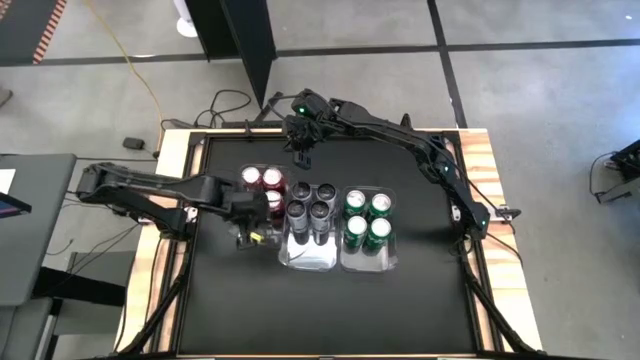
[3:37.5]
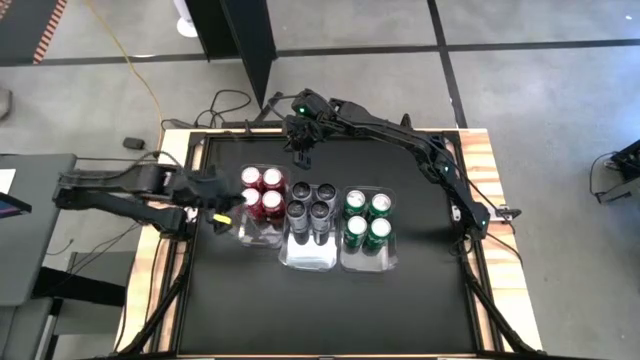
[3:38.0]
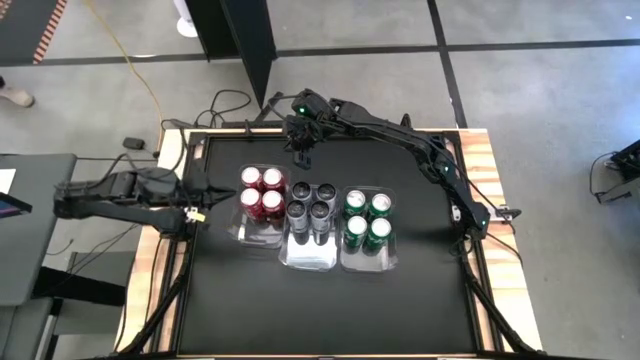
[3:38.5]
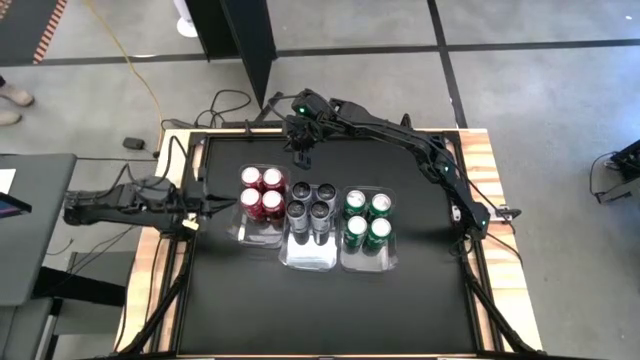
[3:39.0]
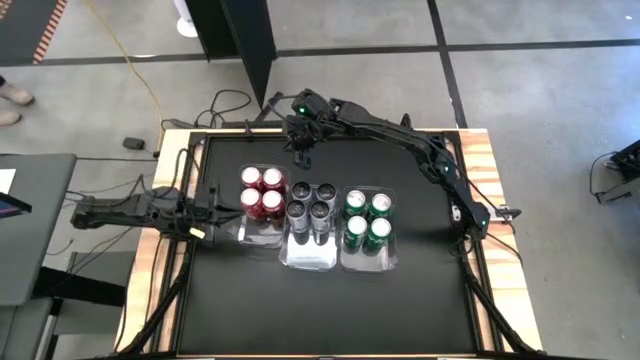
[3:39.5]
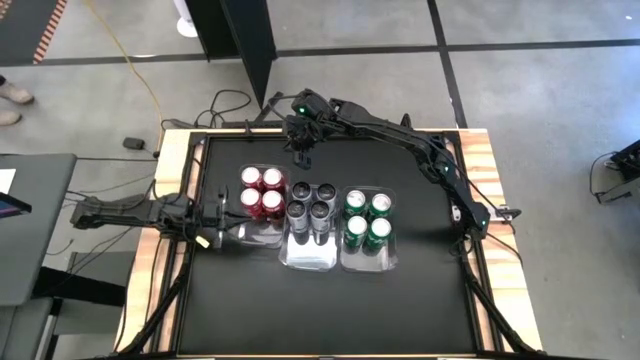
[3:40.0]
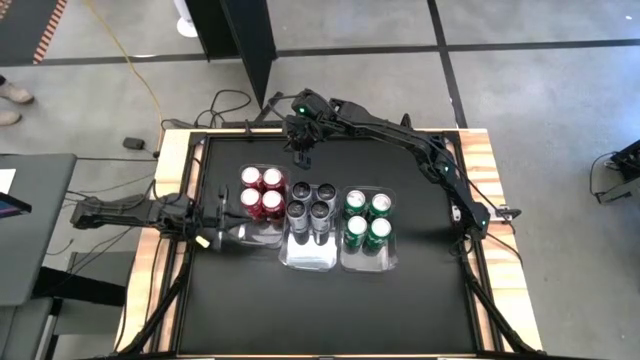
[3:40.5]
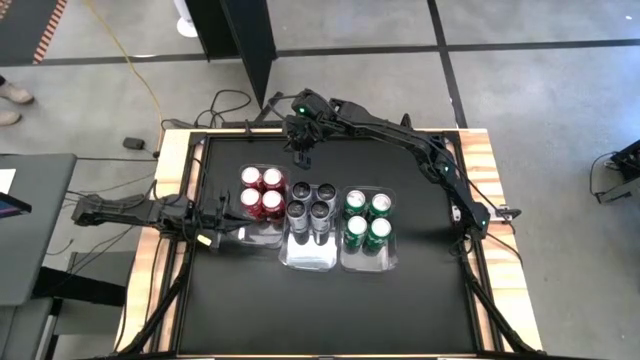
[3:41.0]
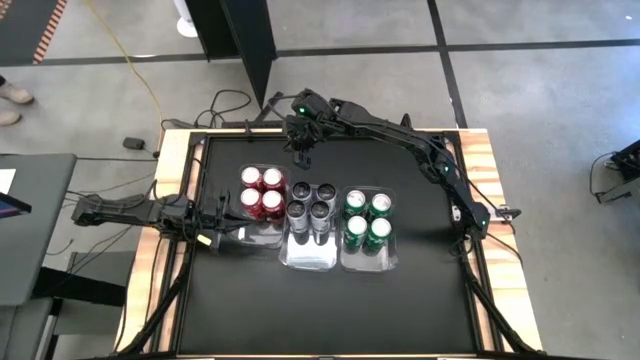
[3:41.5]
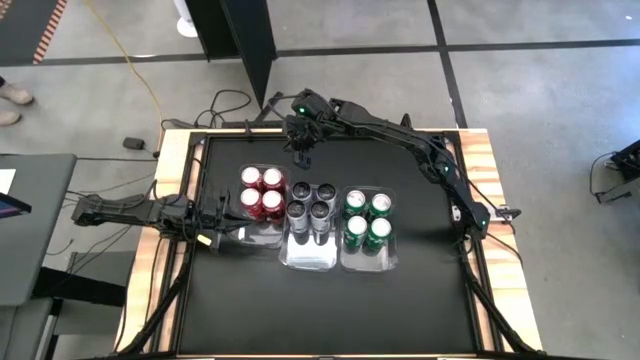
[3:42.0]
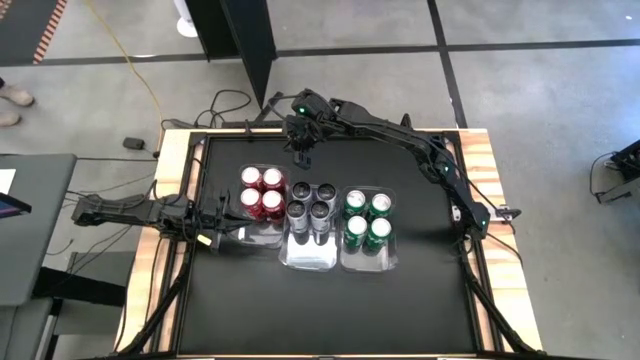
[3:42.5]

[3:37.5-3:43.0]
Task: Sort soda cans
Return to Home Position

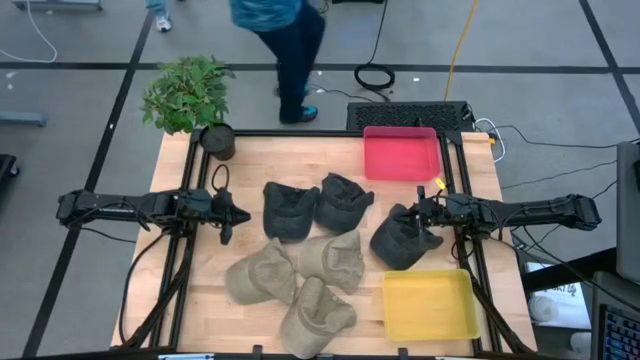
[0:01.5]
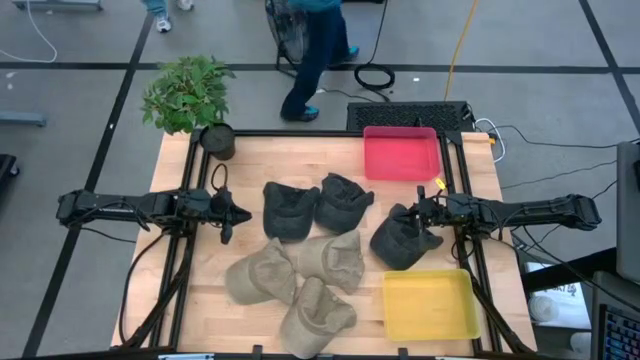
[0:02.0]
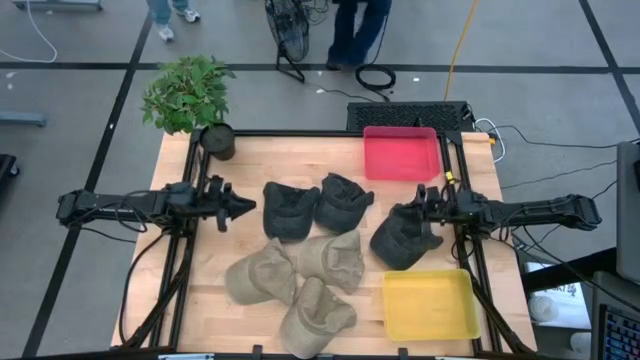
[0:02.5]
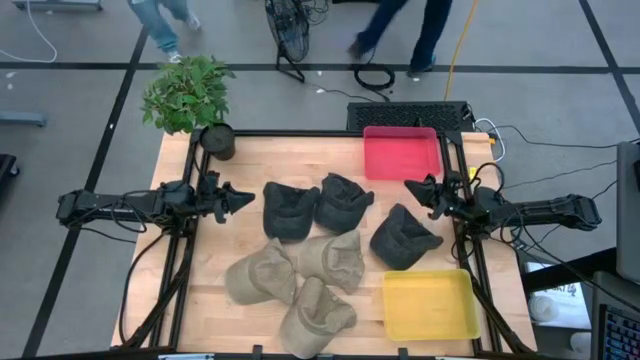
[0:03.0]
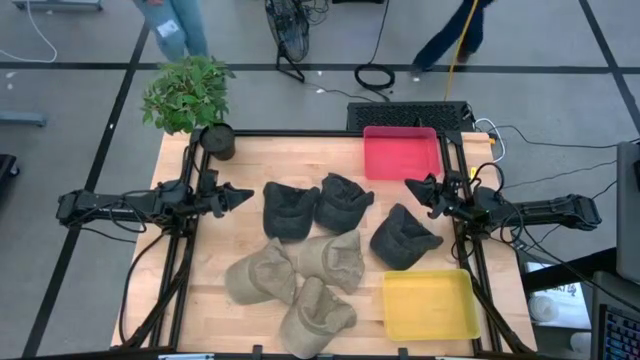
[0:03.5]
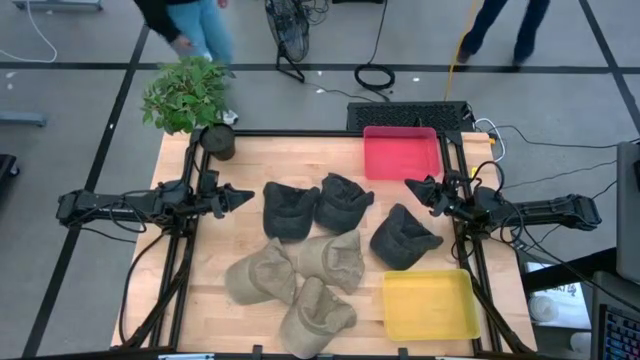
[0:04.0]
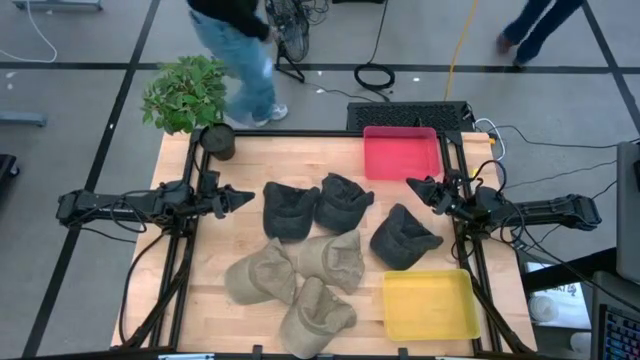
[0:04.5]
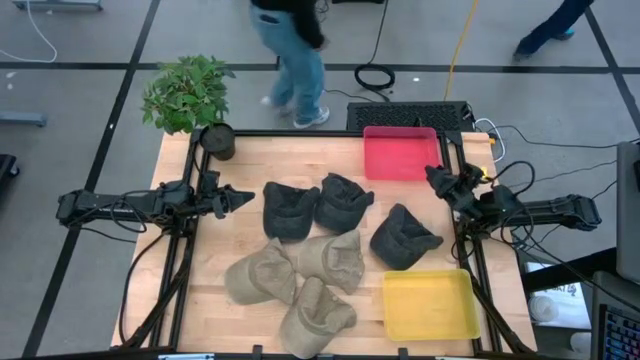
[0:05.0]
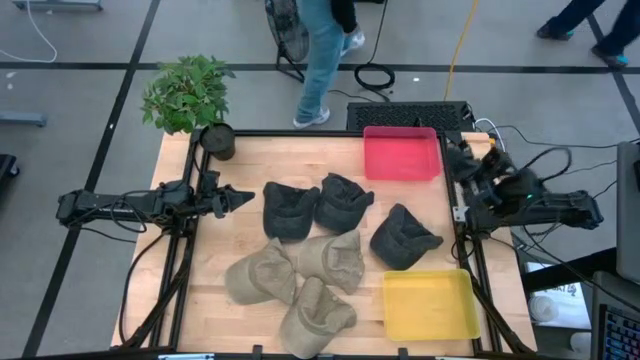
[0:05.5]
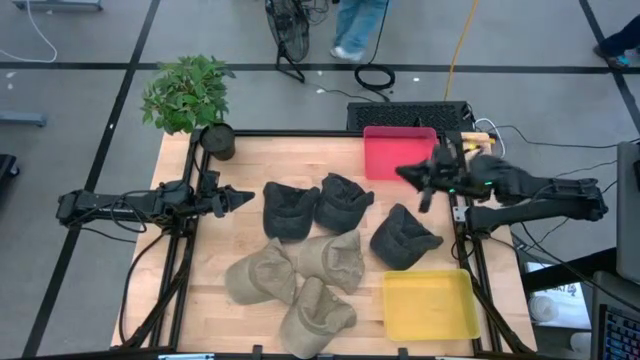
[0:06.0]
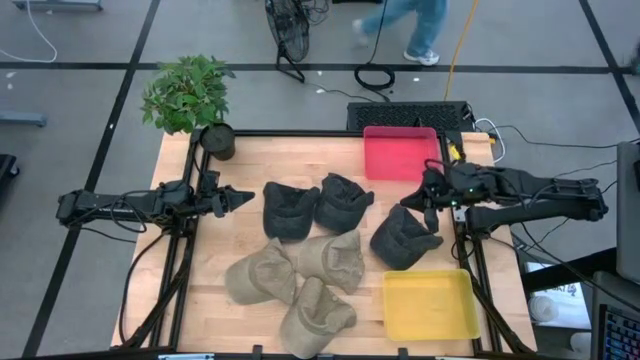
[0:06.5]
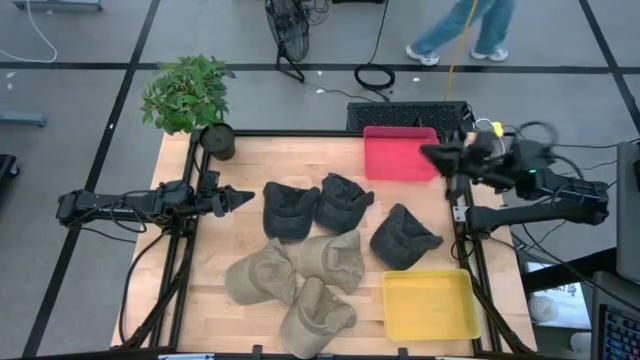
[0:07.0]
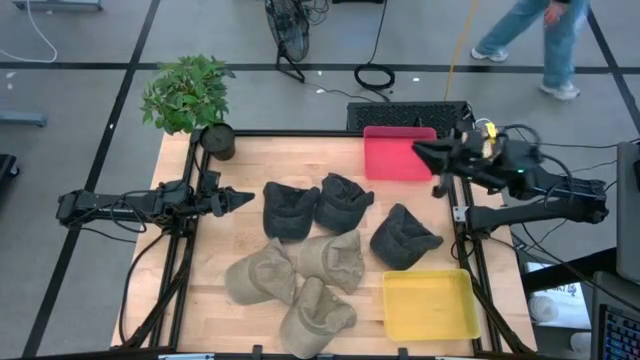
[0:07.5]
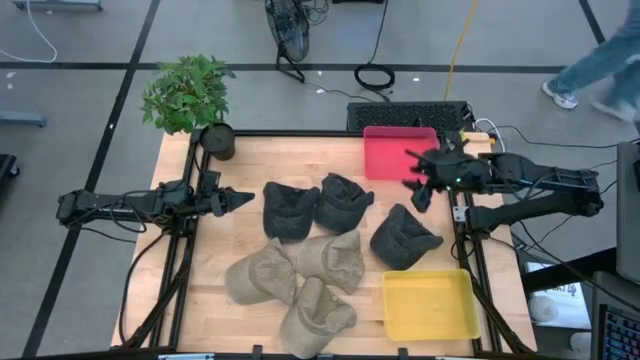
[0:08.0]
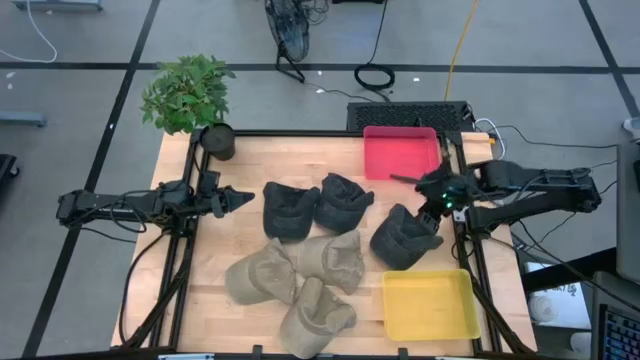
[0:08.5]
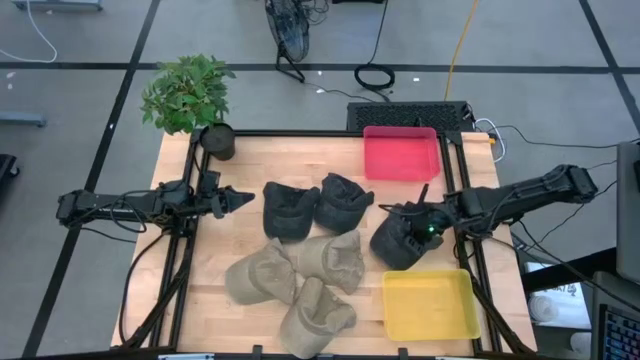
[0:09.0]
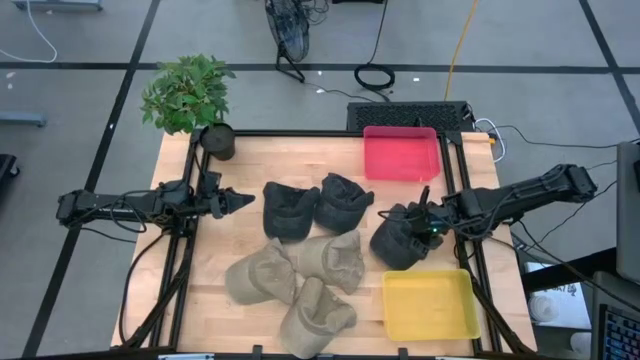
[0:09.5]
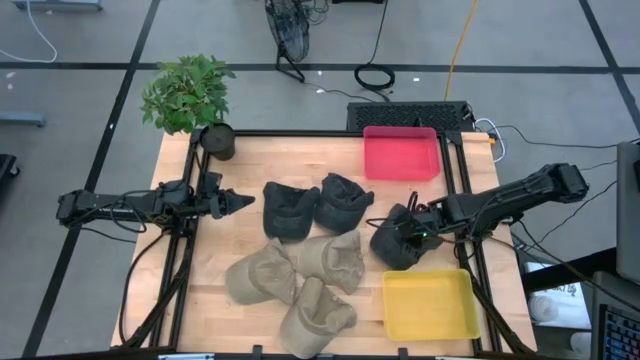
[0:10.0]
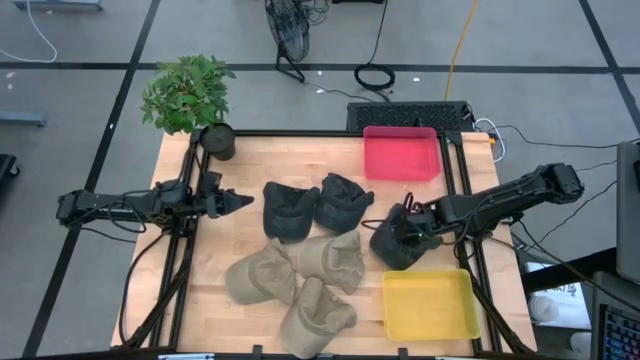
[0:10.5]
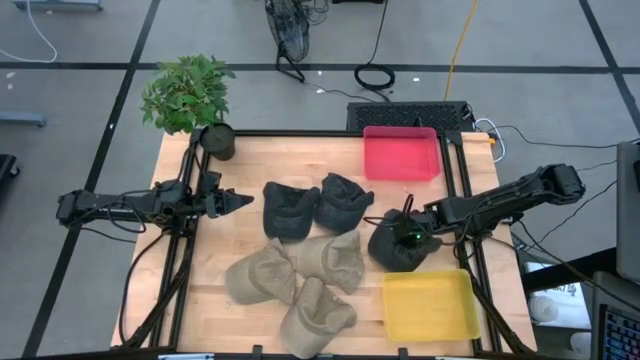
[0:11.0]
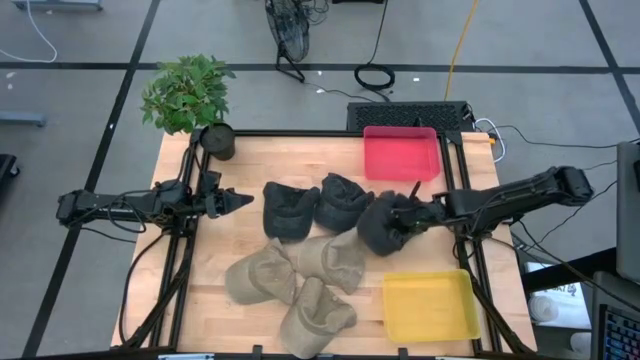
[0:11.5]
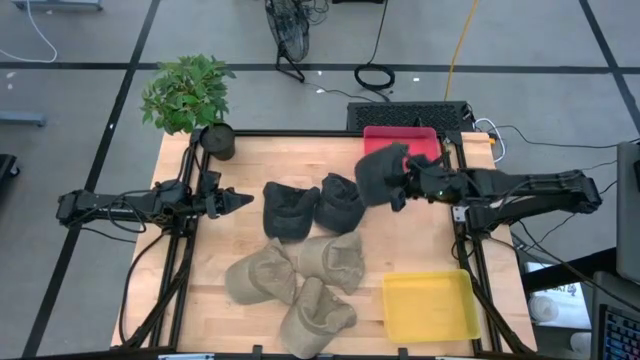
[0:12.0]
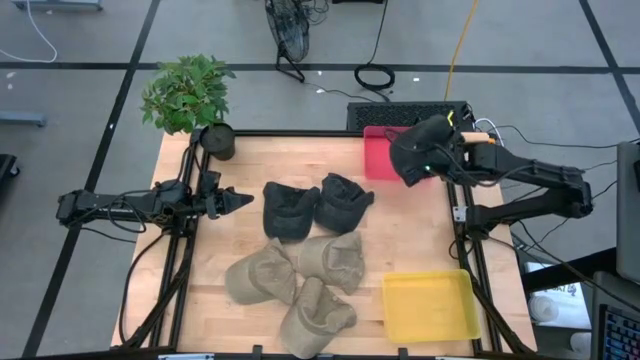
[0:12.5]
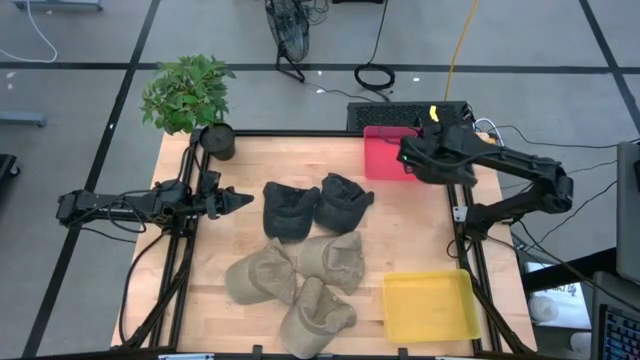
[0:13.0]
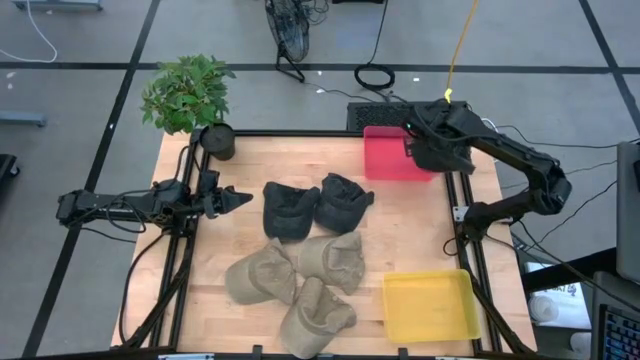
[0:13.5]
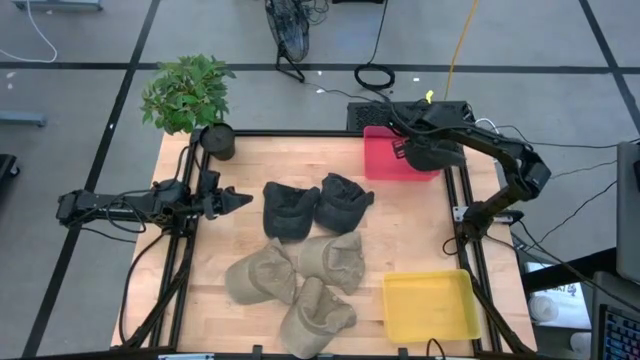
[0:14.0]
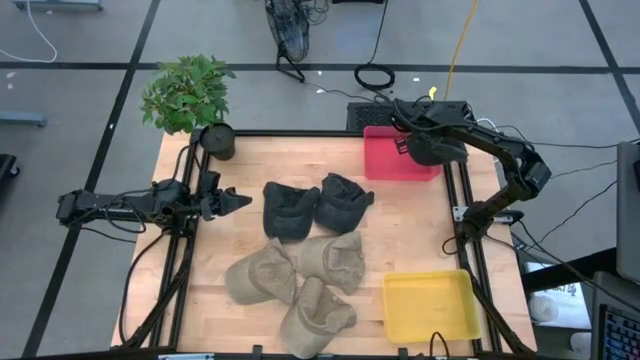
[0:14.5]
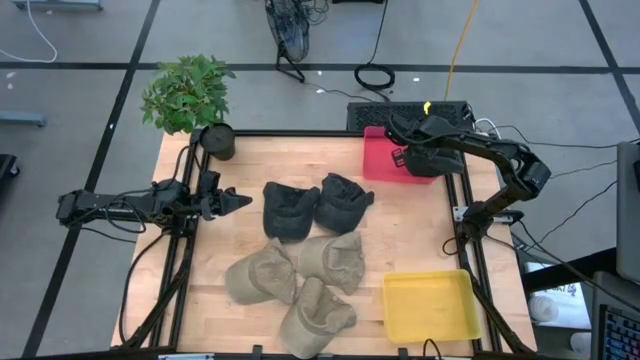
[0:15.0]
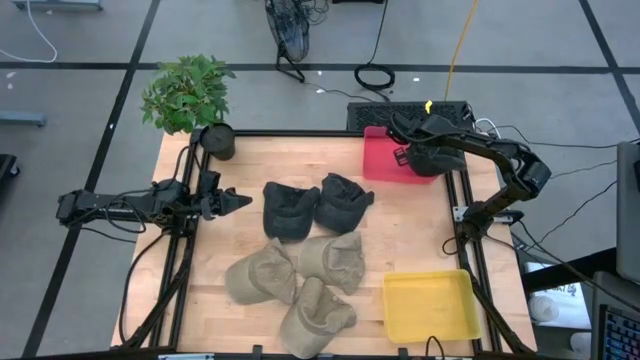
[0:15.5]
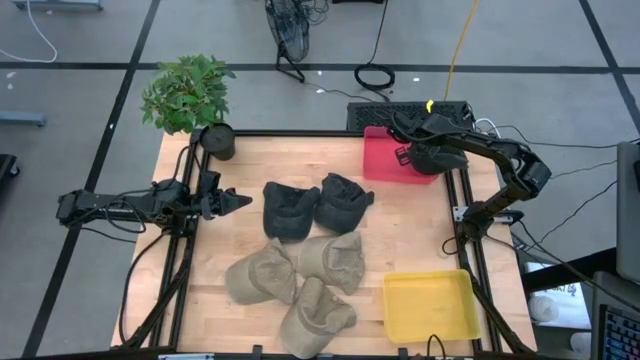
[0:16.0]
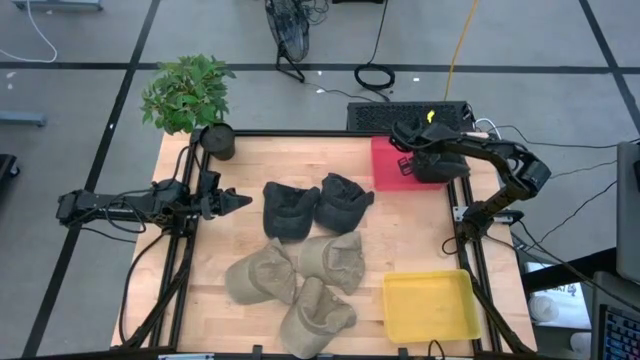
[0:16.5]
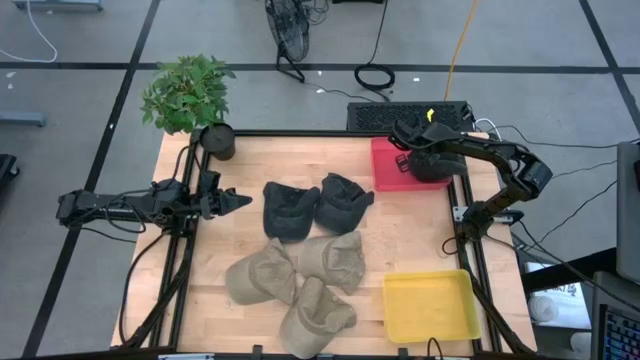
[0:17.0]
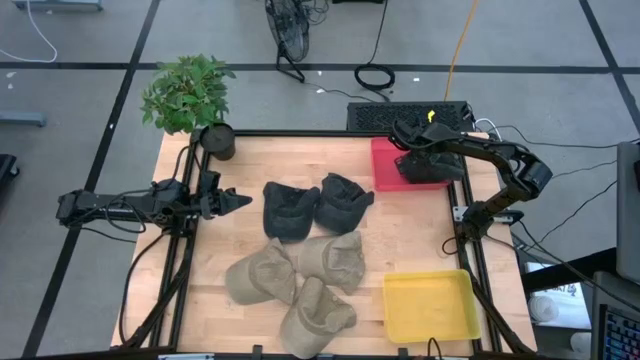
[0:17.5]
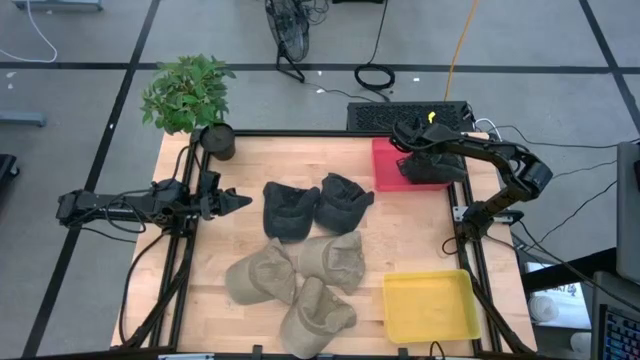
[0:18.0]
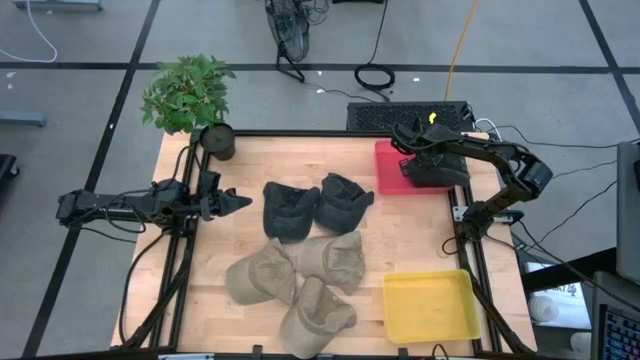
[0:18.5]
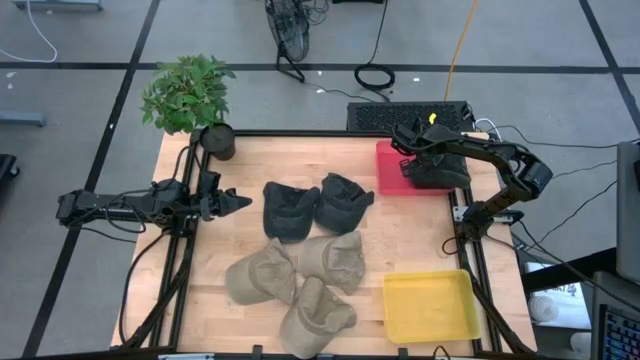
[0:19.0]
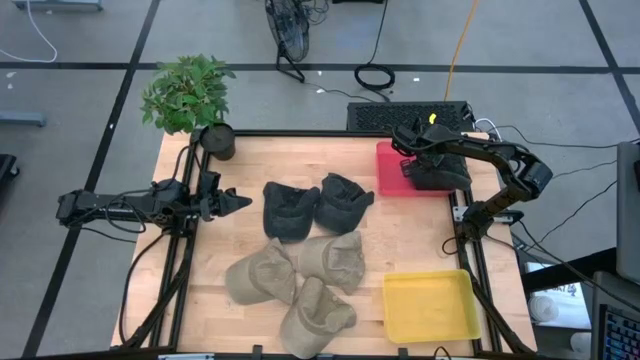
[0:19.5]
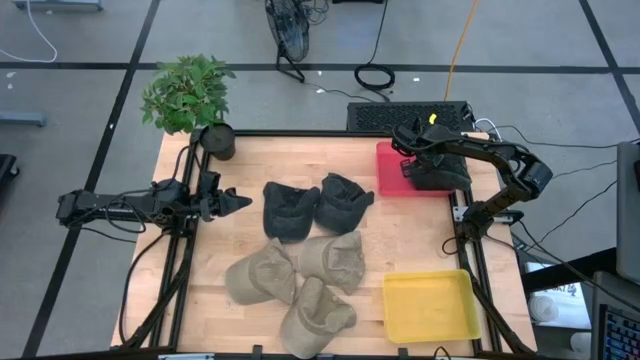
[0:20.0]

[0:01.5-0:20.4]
Task: Pick & Place hat
Put the right black cap into the red bin
